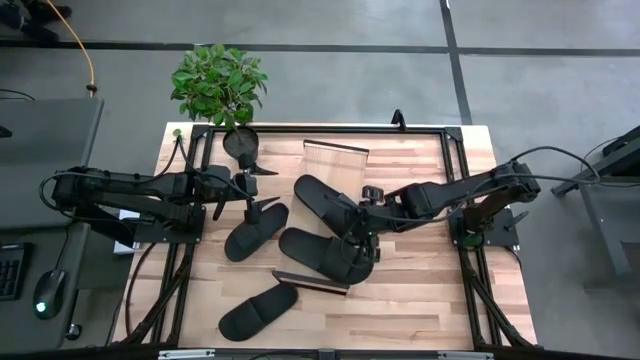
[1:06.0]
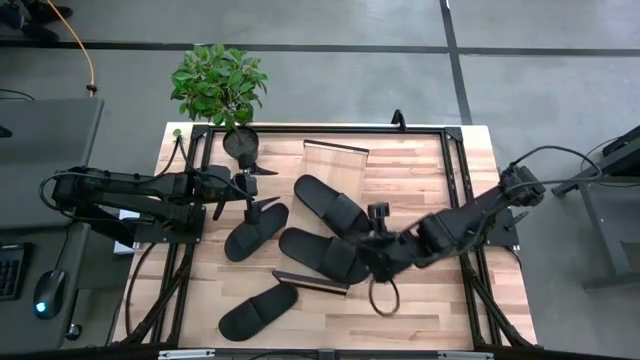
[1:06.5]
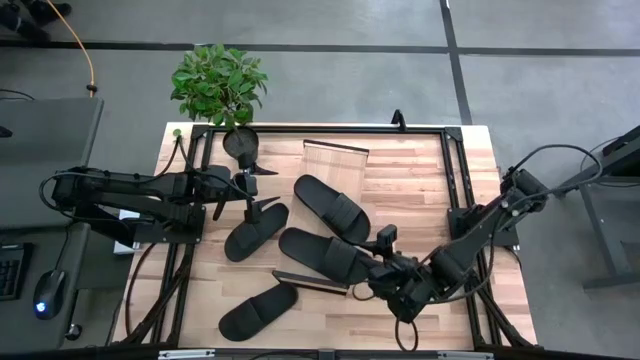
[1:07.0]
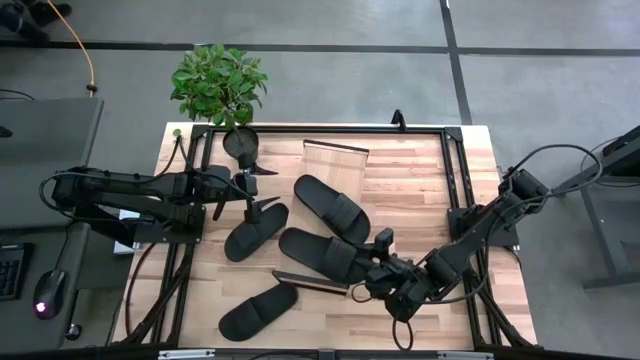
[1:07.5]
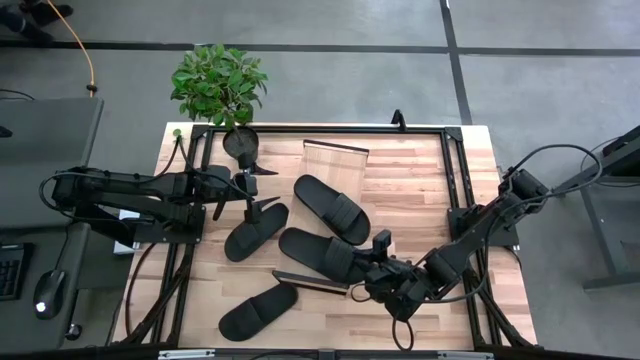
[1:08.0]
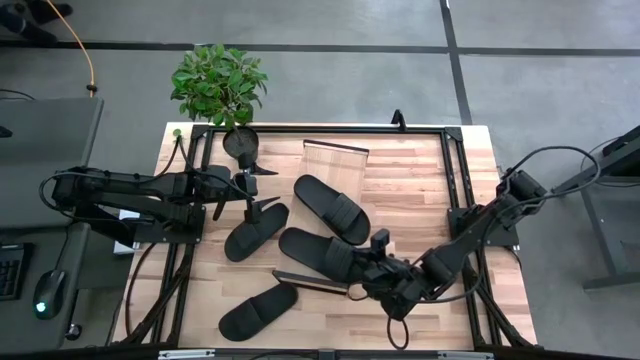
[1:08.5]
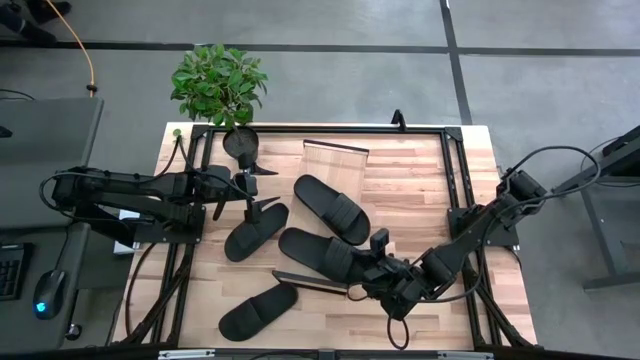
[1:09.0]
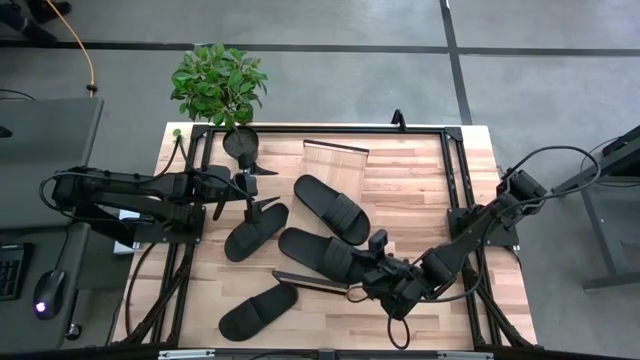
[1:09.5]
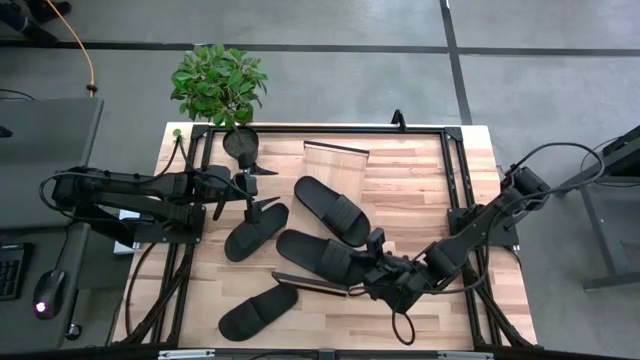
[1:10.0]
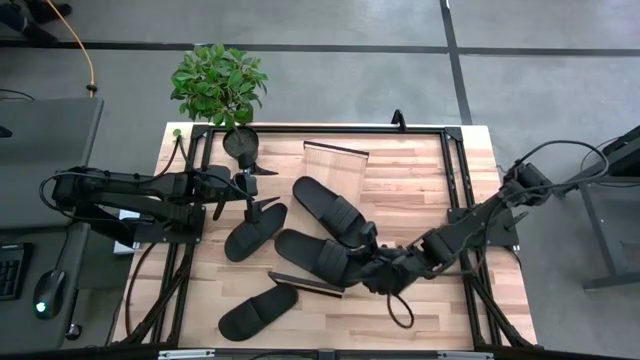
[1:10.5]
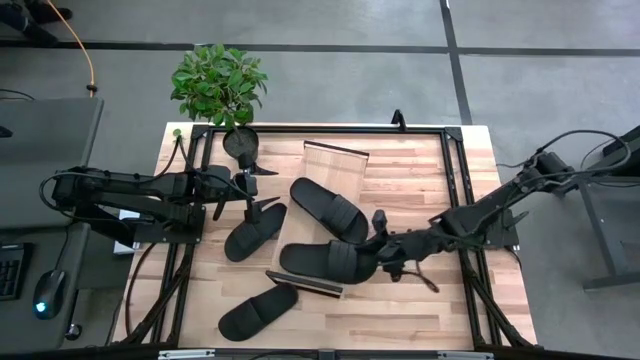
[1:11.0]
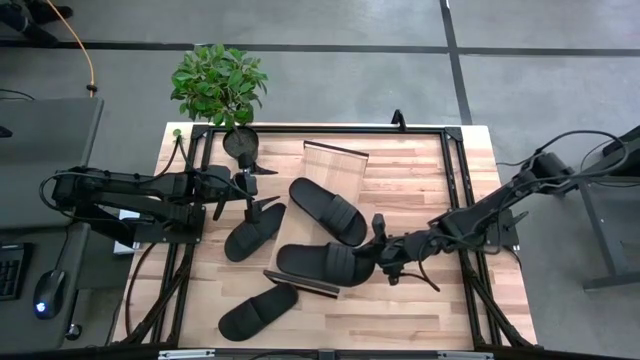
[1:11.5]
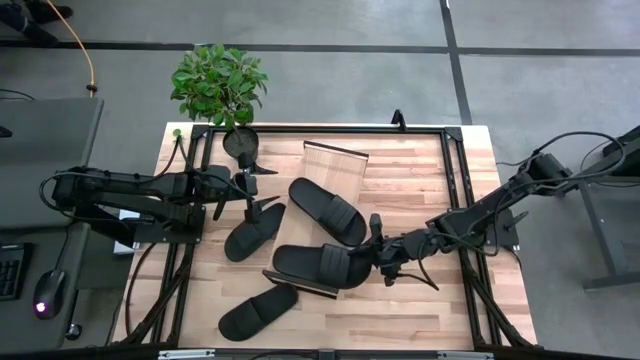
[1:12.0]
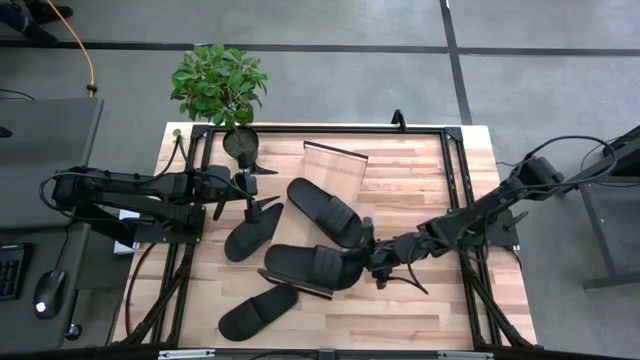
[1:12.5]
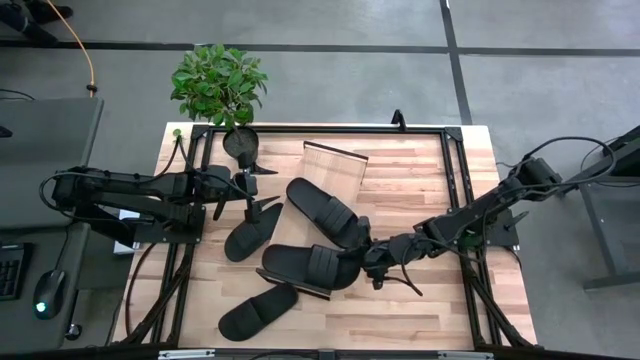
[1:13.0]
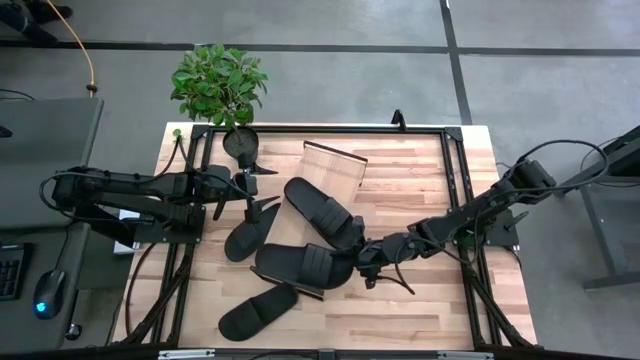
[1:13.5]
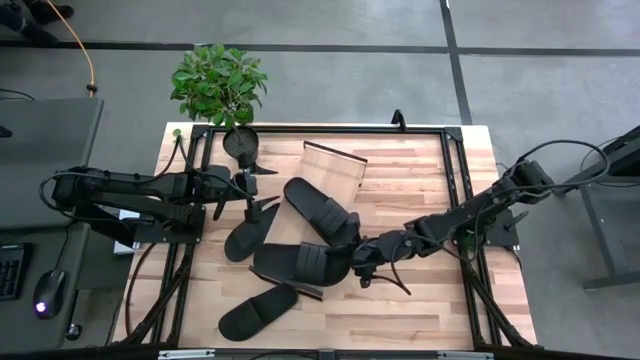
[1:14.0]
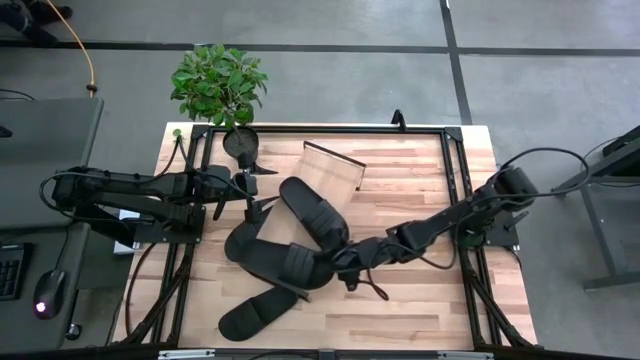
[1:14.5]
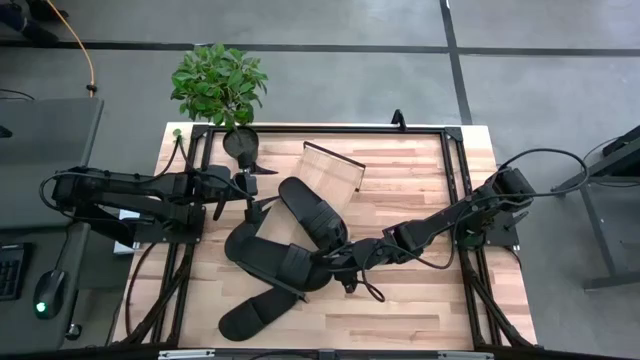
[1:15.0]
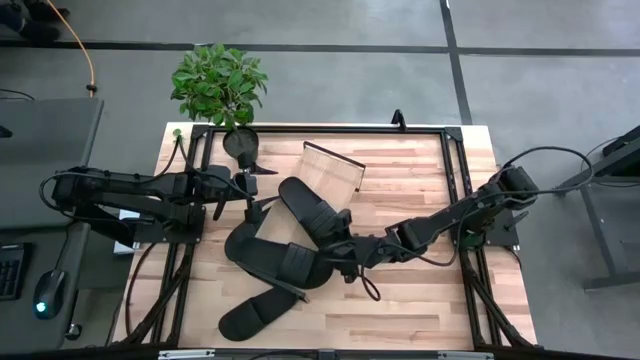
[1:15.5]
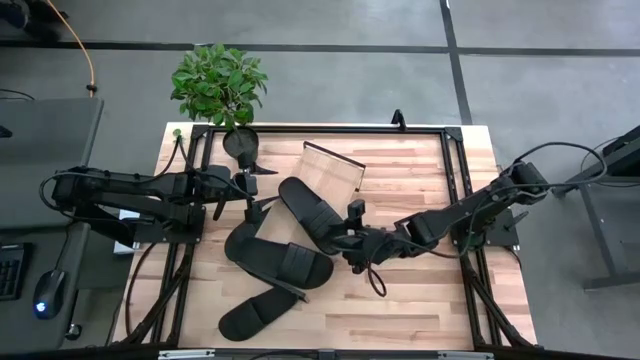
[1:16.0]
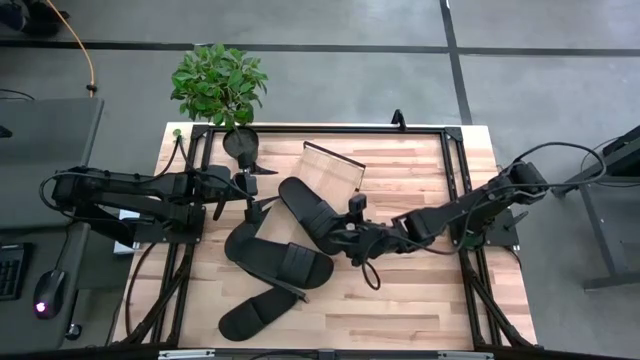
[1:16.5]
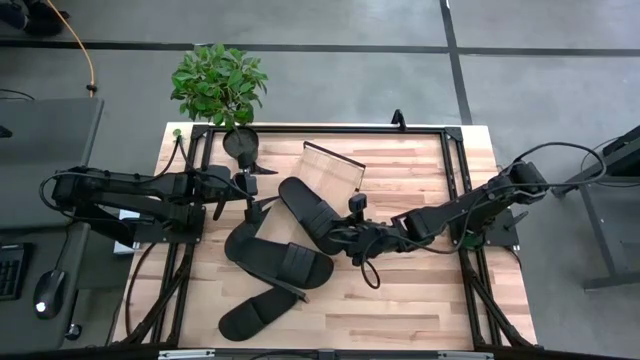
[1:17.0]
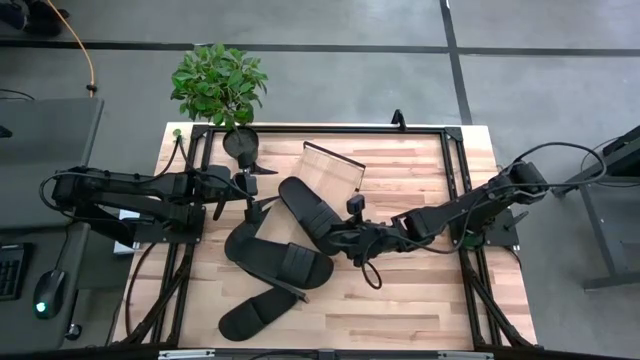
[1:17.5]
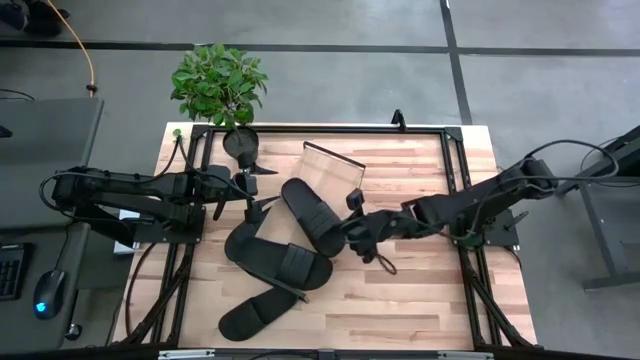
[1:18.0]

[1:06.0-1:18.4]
Task: Pick and place slides into the shelf
Adjust the black slides on the shelf

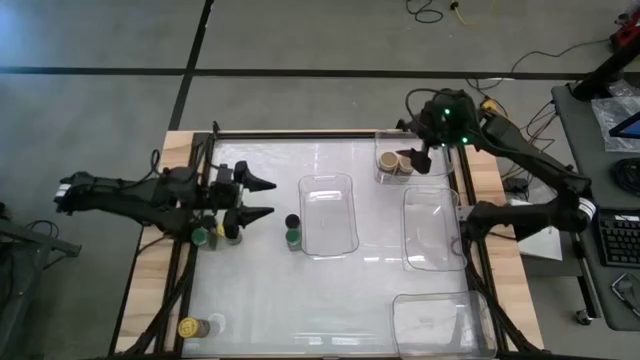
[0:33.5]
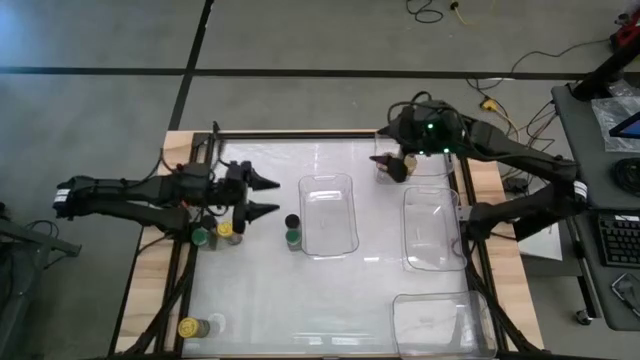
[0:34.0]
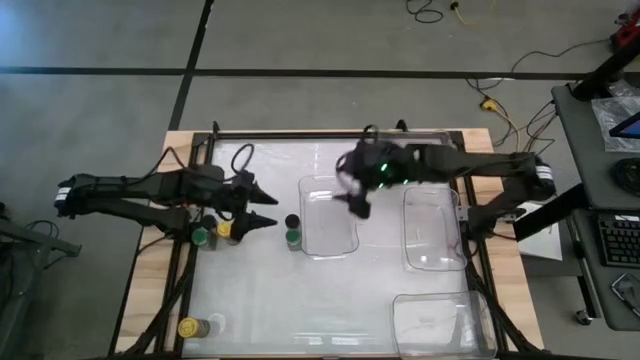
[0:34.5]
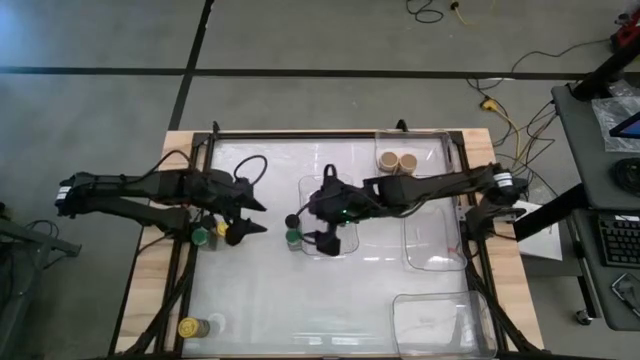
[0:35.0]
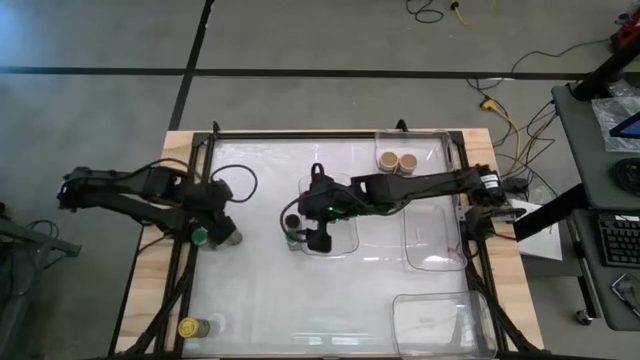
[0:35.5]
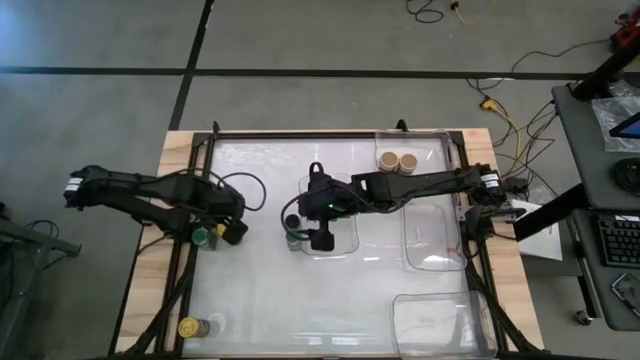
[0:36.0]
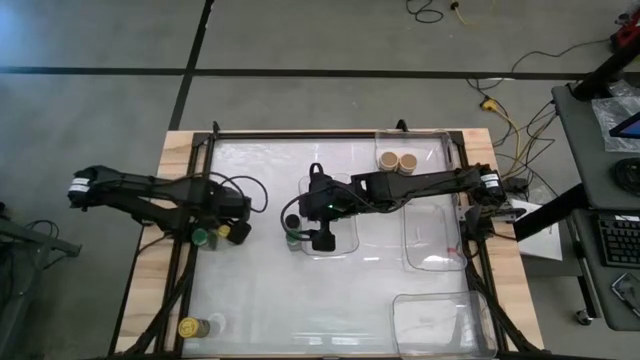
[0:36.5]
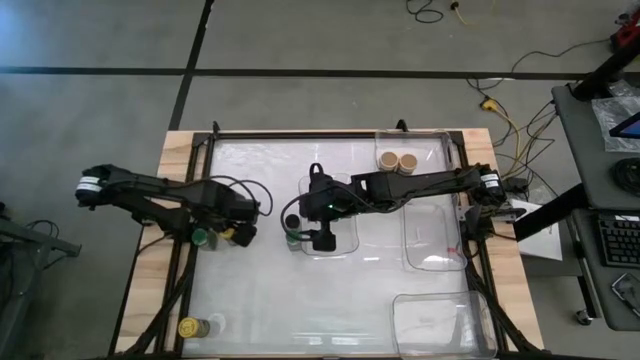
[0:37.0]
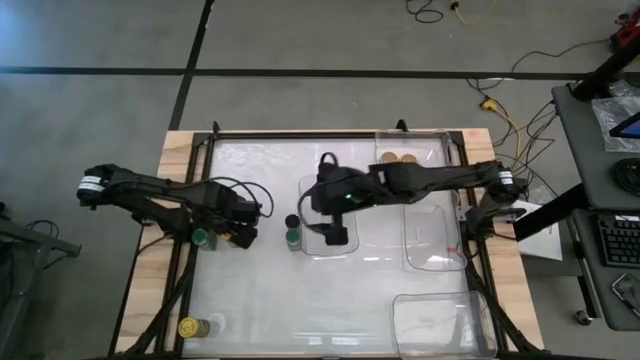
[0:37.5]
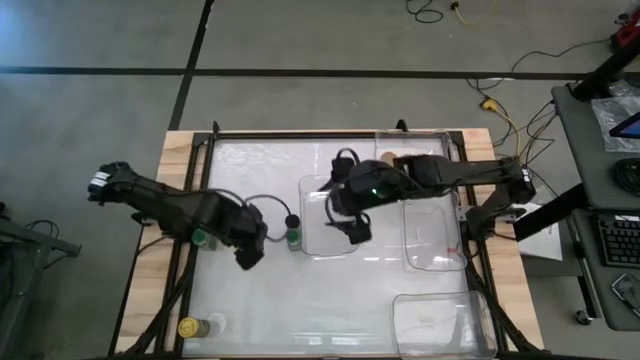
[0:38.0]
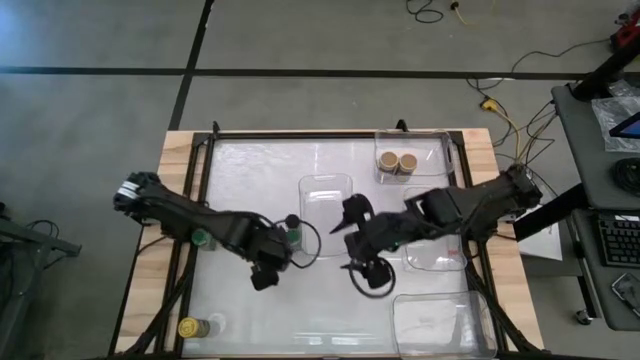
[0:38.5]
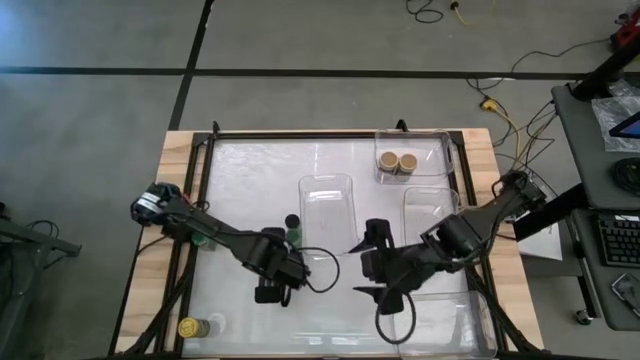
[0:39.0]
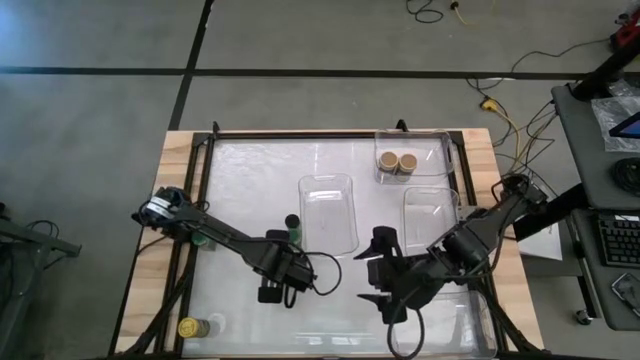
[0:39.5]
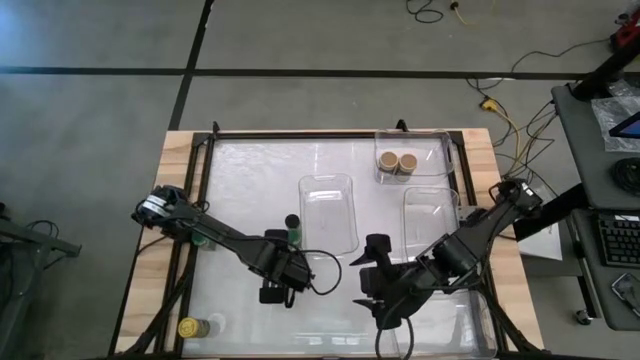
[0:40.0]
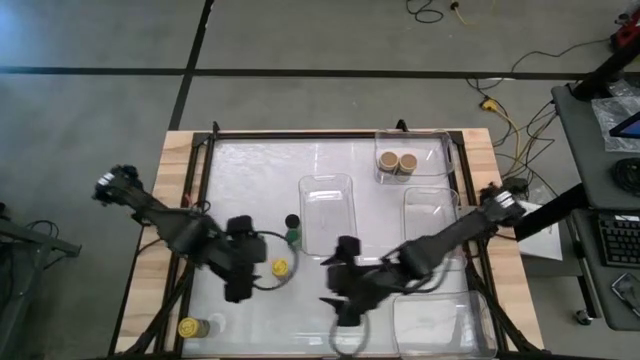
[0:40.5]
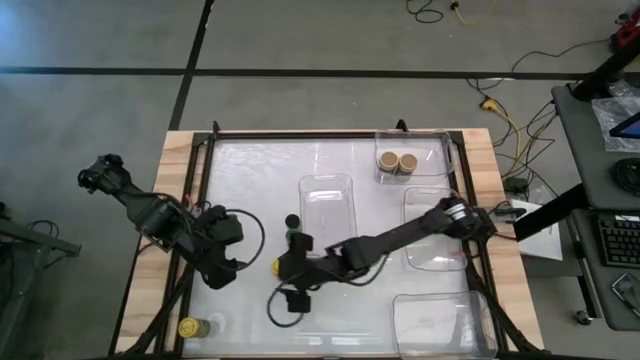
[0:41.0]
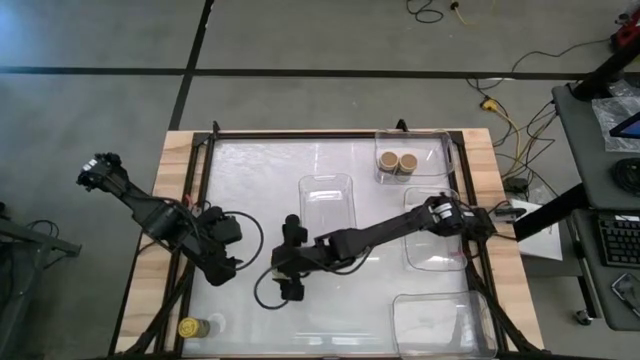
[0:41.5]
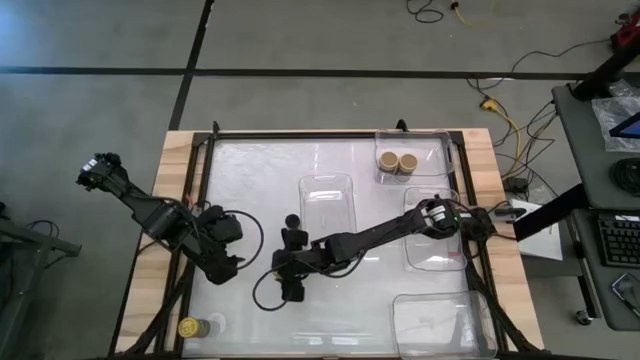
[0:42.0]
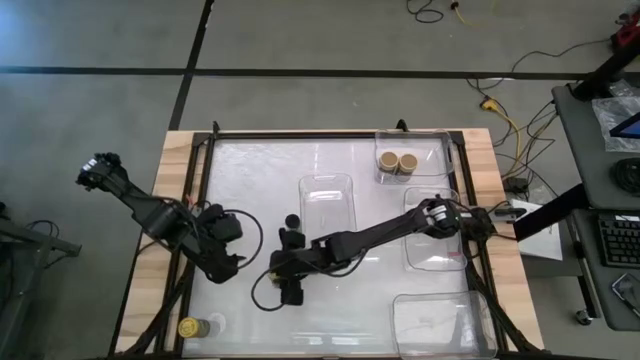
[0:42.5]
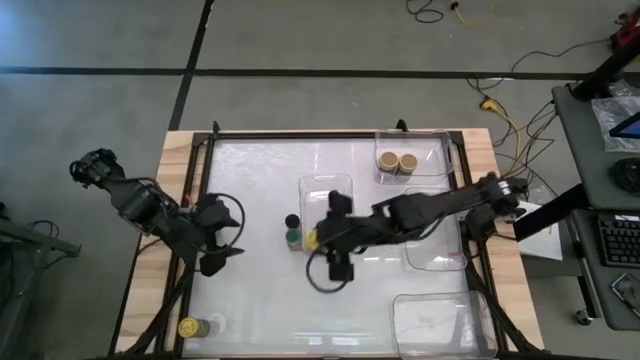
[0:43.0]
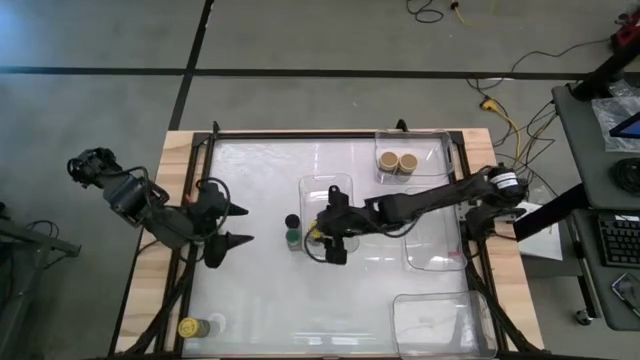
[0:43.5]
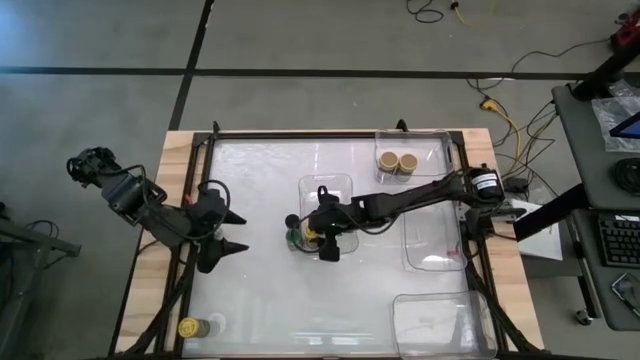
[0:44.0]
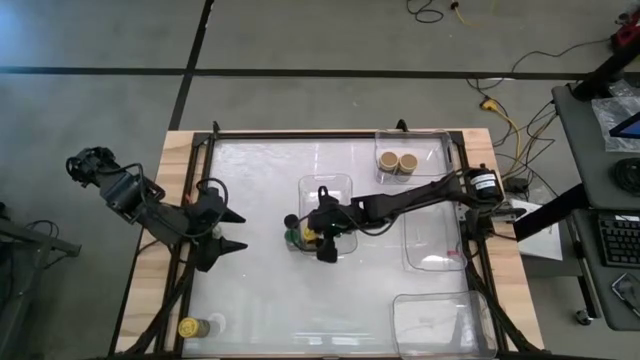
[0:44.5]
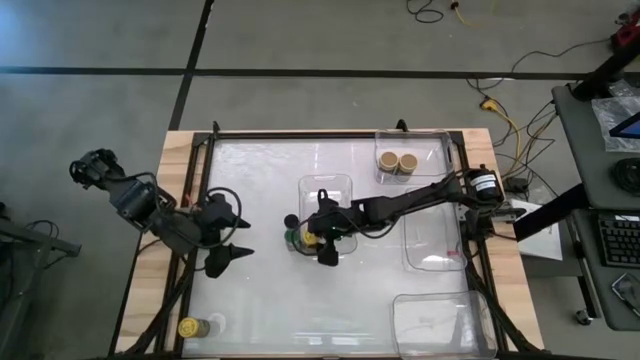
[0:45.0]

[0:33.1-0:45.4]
Task: Sort spices by type
Put the top yellow seasoning bottle into the middle left transparent bin
